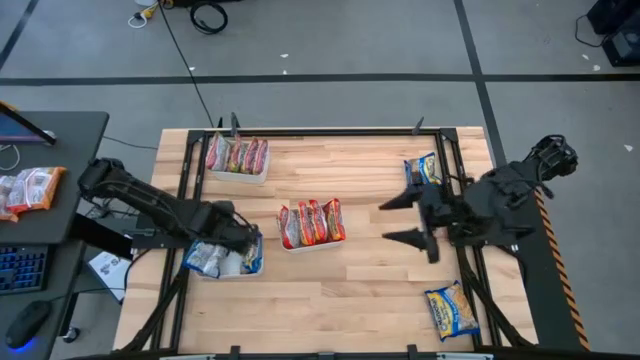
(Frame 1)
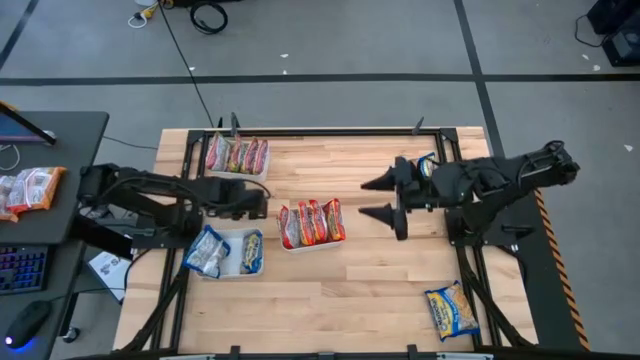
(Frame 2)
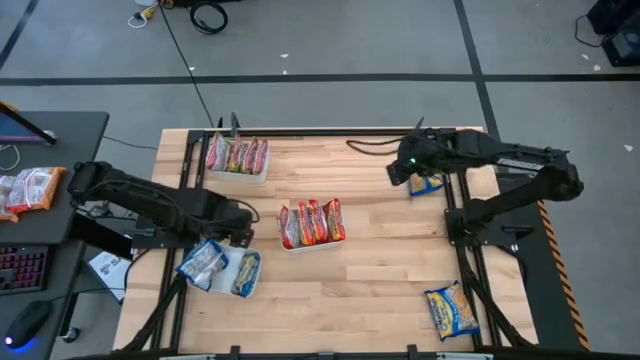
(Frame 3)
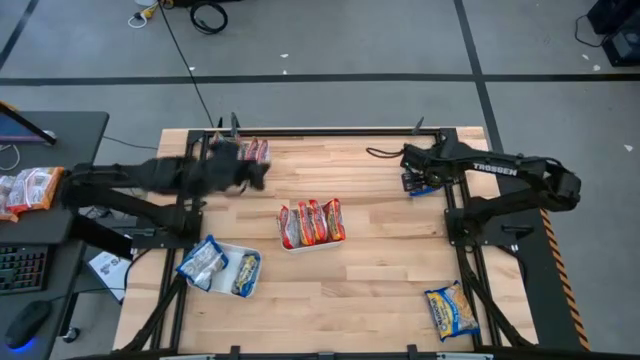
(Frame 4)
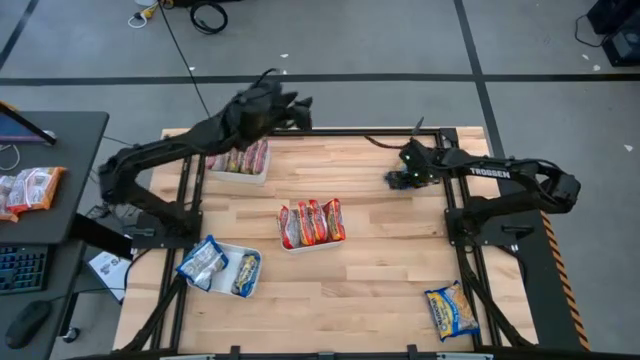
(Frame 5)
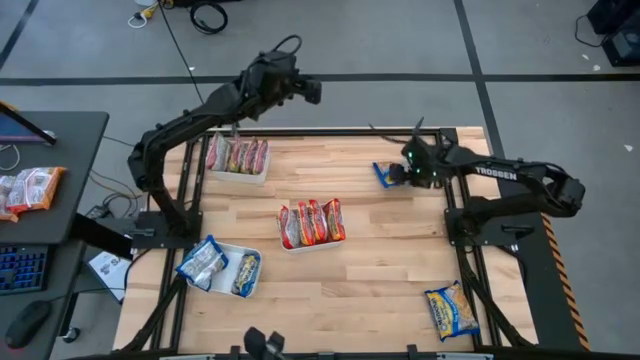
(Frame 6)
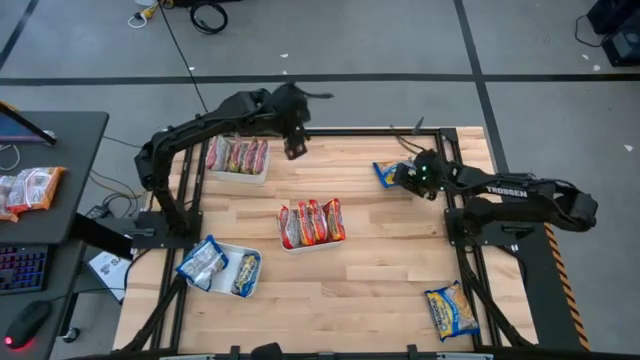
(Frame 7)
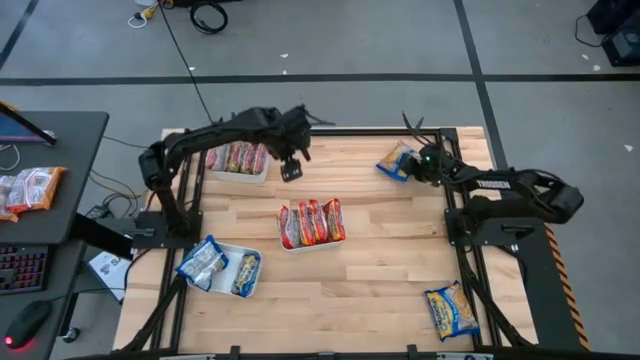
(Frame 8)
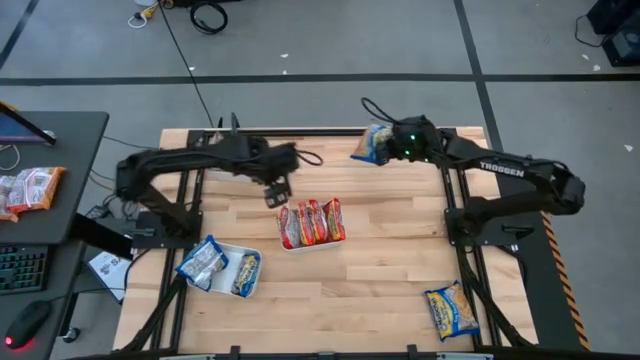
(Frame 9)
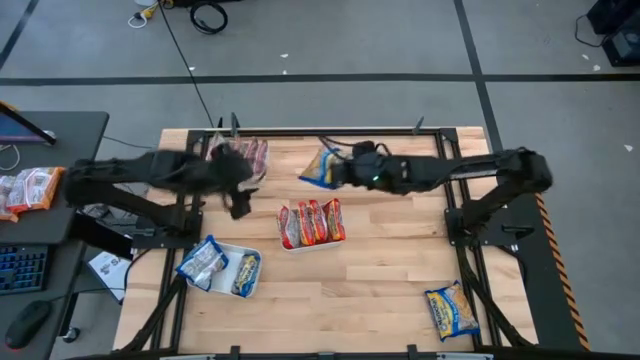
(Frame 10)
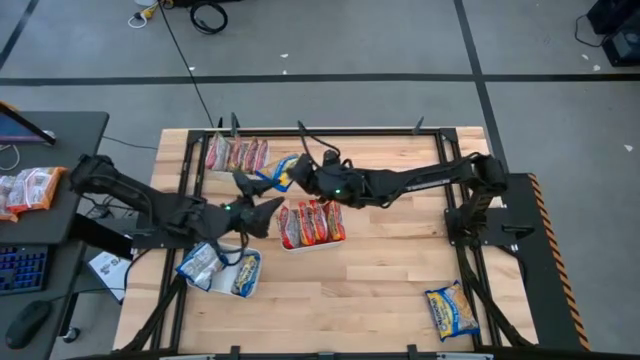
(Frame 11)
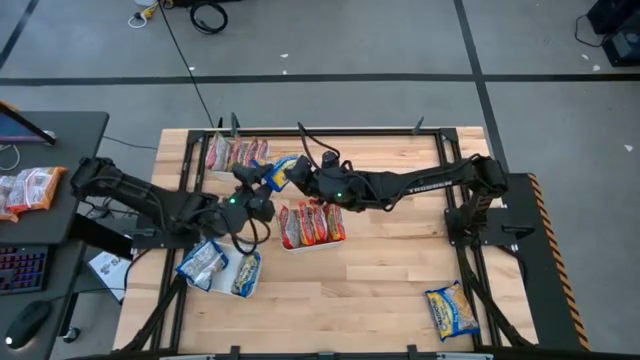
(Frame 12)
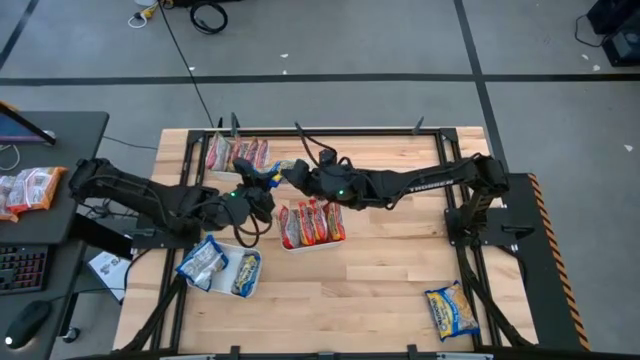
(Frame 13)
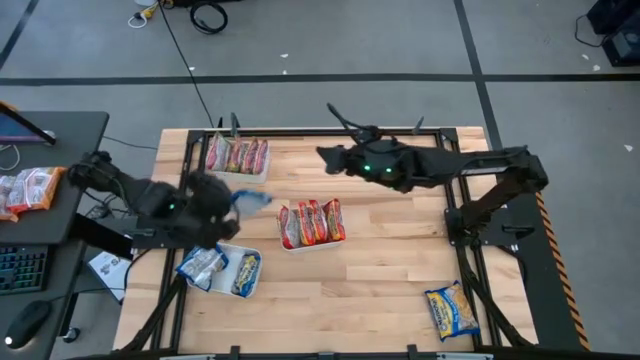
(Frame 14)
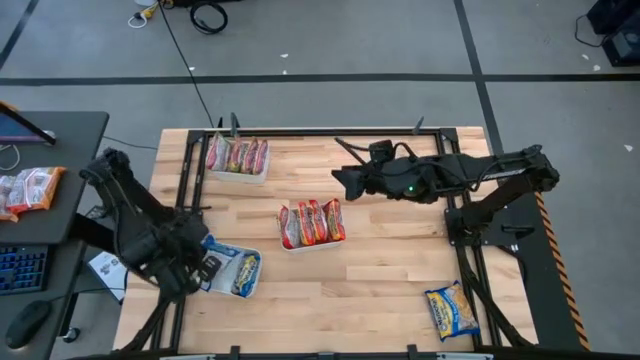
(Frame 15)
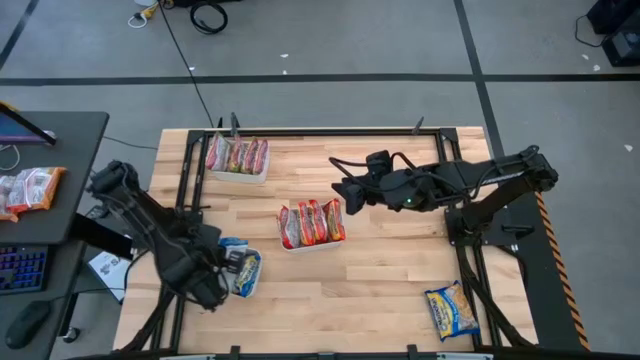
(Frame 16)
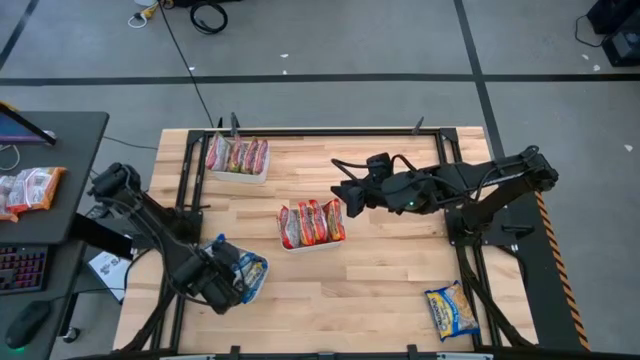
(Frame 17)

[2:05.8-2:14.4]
Task: Sort Maruchan noodles
Put the blue noodle pack into the bottom white bin

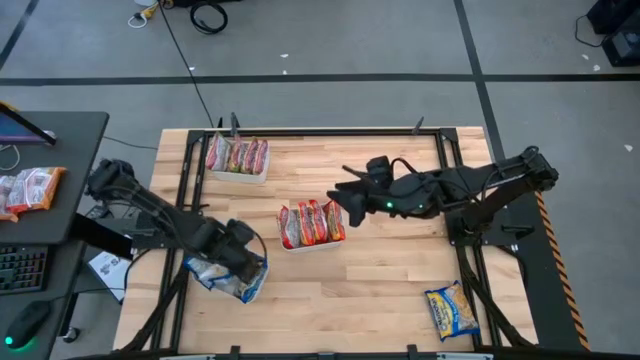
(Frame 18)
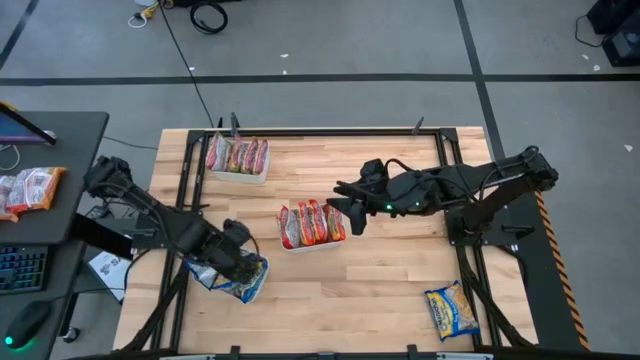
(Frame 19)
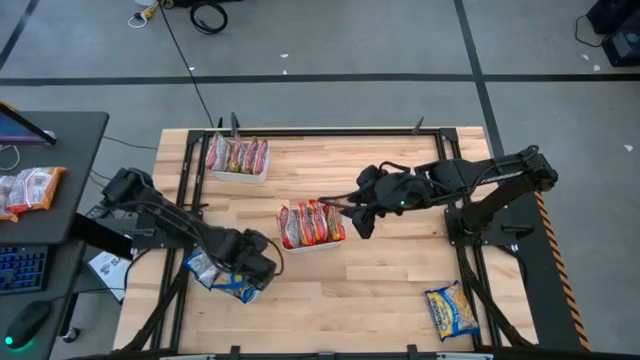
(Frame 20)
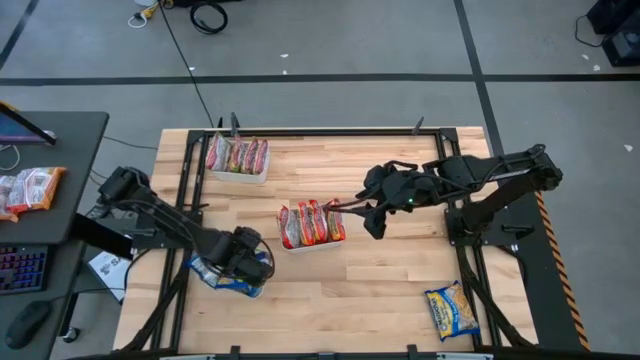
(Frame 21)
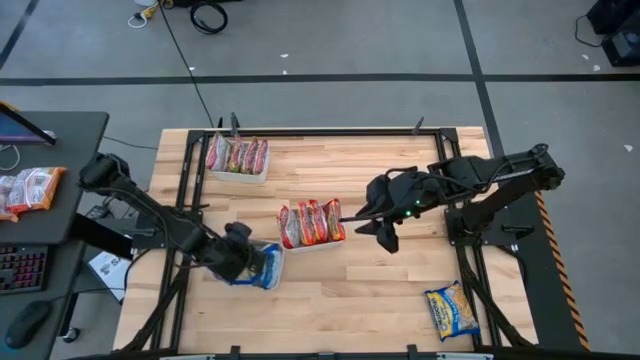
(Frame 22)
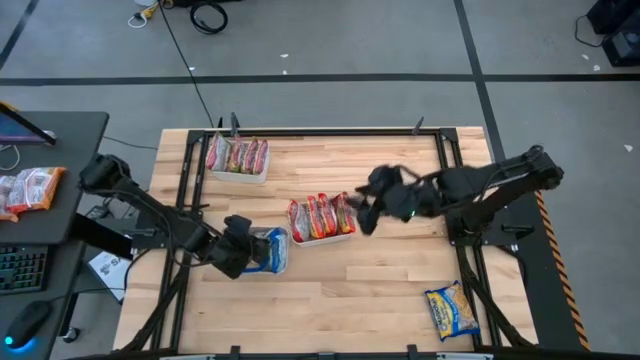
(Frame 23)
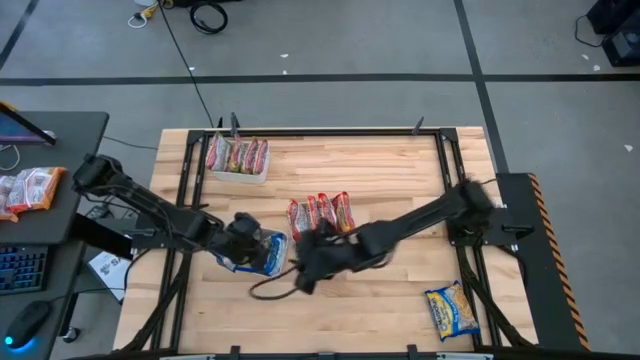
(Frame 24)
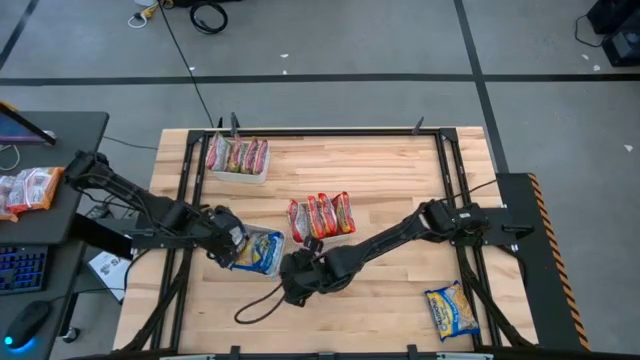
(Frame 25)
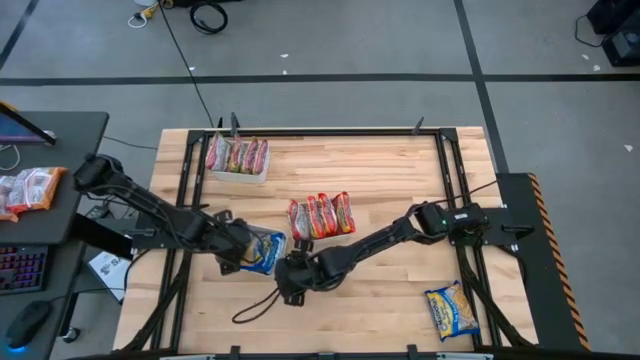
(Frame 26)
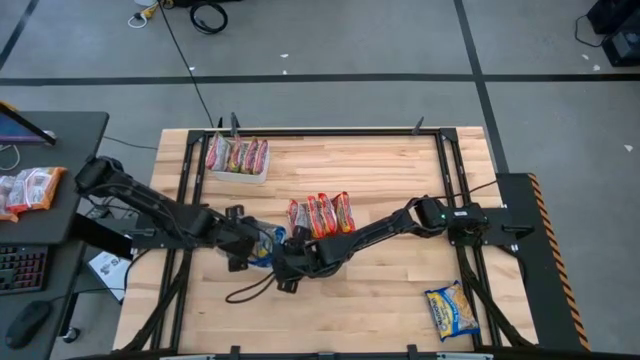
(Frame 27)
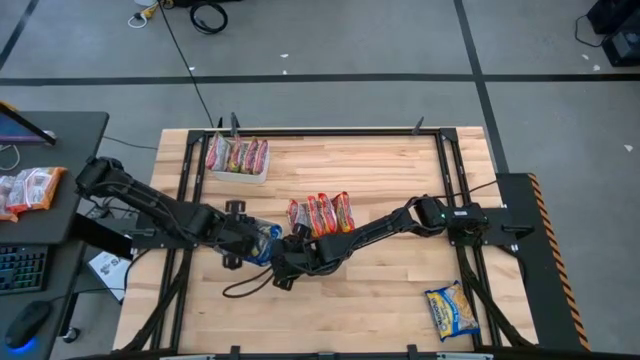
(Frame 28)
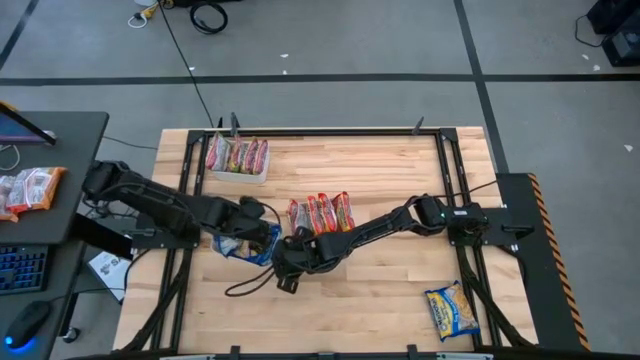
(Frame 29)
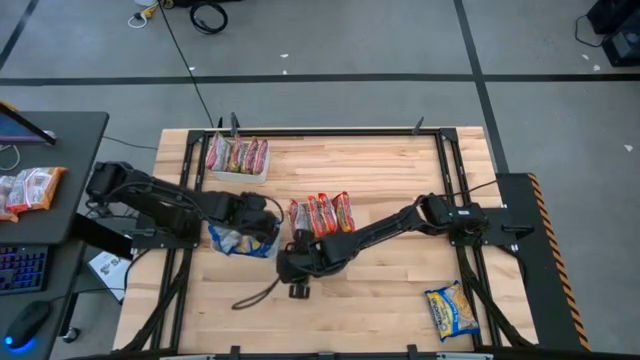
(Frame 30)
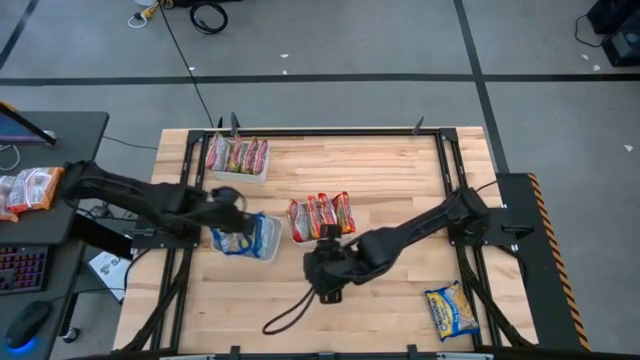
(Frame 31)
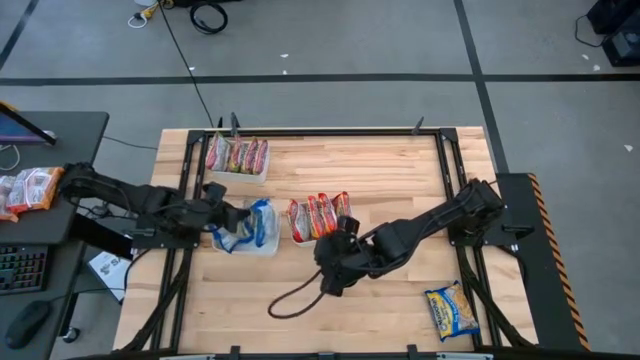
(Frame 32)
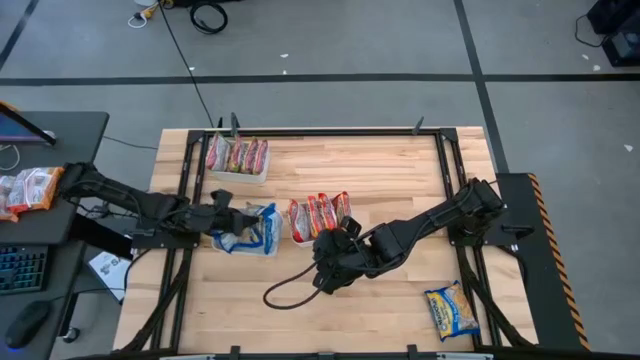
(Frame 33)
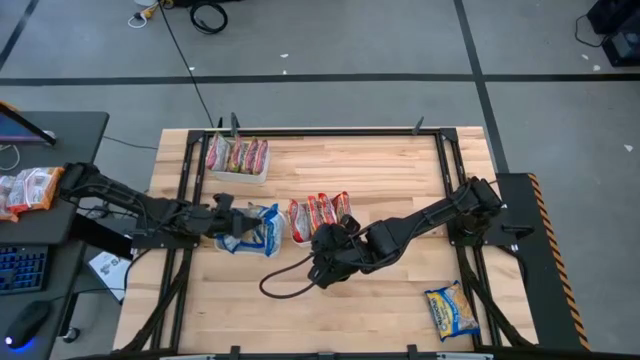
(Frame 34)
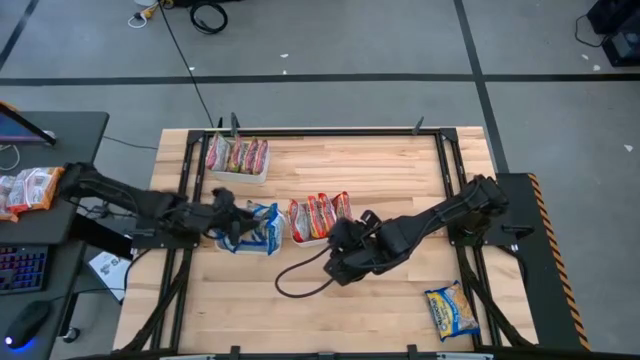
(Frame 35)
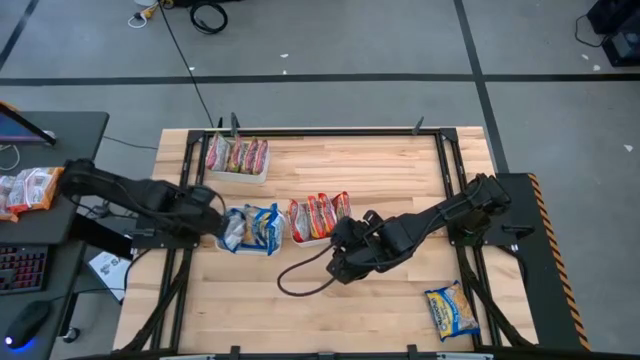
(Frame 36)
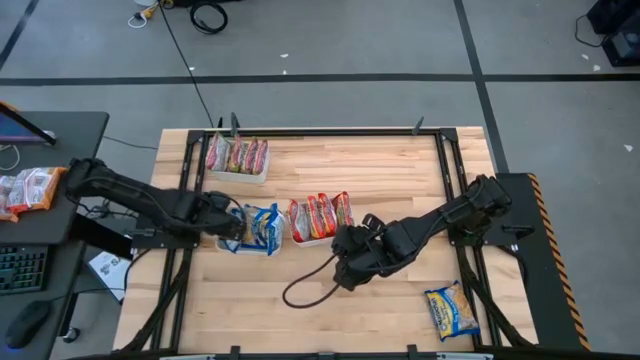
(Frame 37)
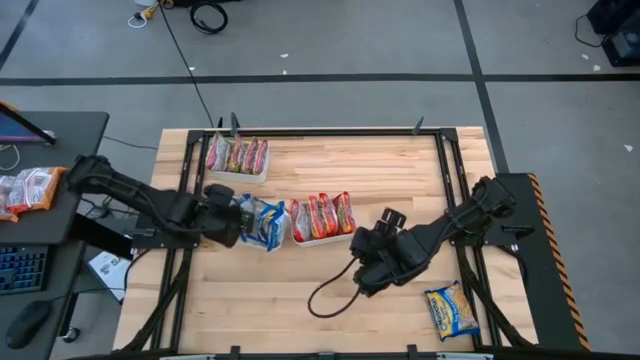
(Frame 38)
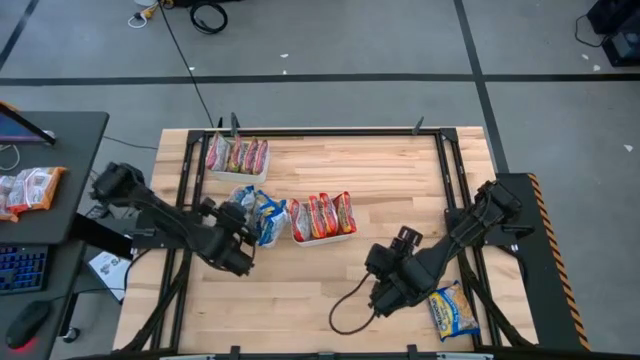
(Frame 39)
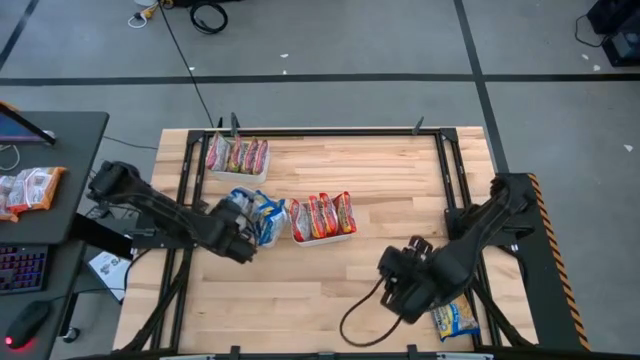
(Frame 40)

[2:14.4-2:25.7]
Adjust the blue noodle packs in the bottom white bin

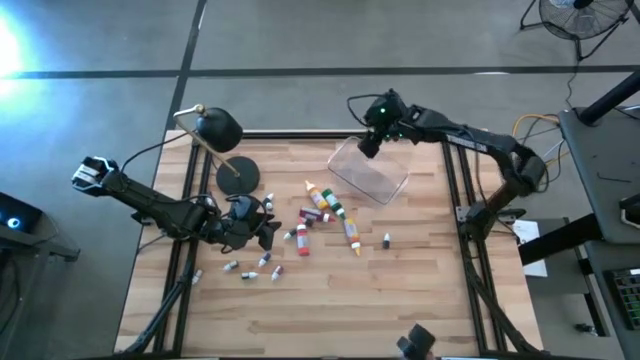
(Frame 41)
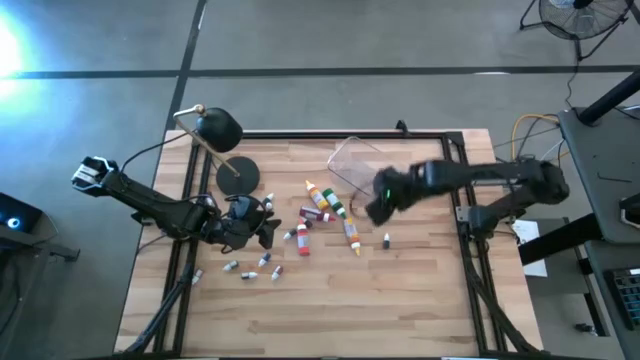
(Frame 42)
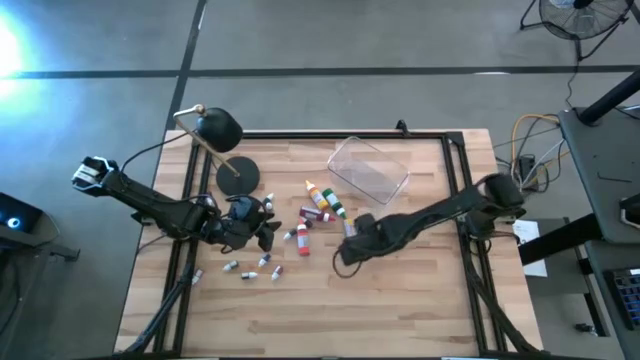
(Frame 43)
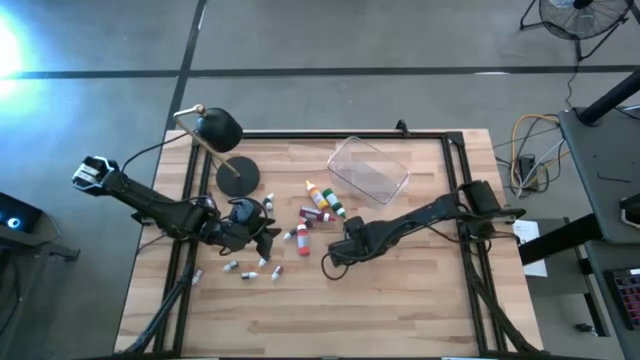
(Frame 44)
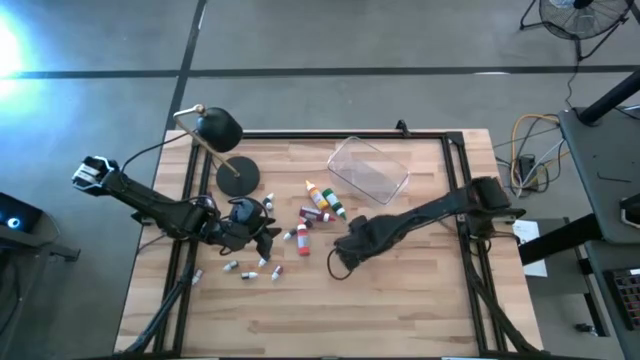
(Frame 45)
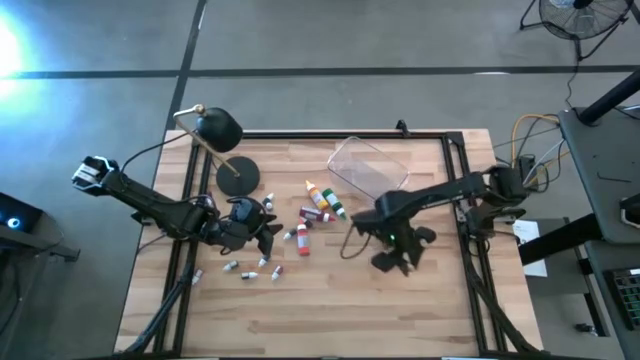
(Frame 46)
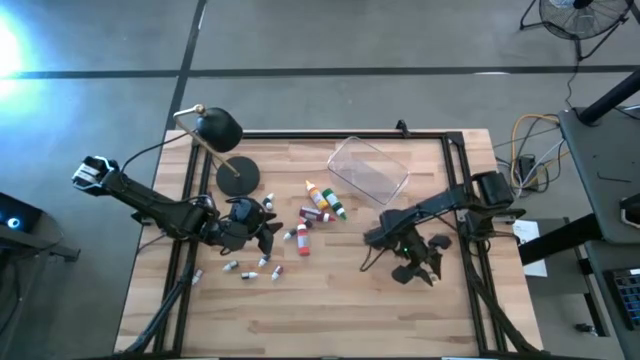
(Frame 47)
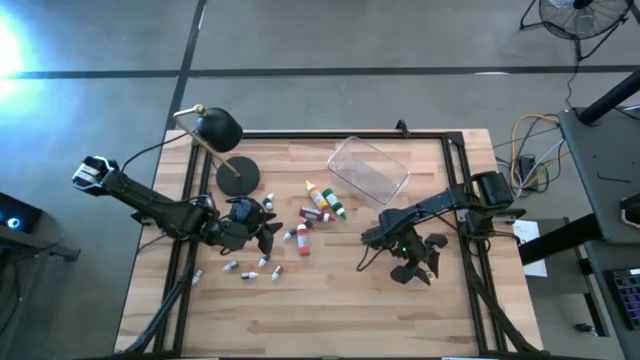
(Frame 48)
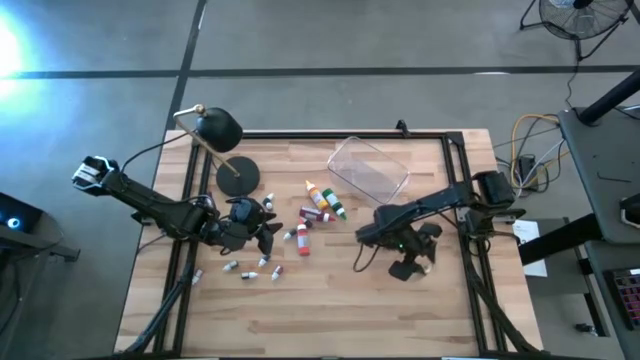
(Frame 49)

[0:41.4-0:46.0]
Task: Pick & Place food coloring
Adjust the large bottom yellow food coloring bottle
